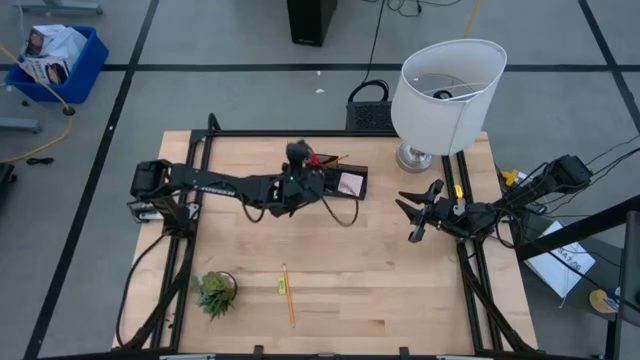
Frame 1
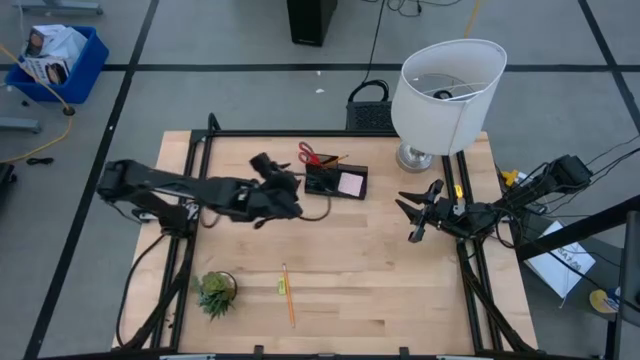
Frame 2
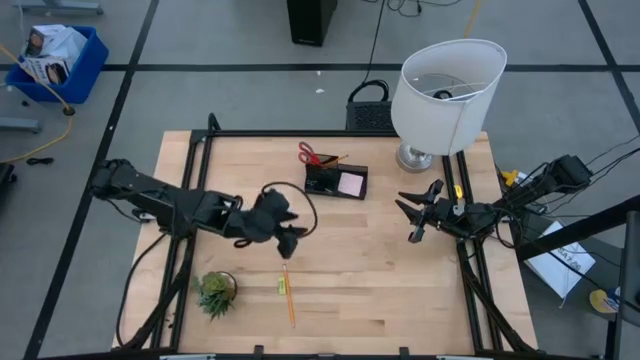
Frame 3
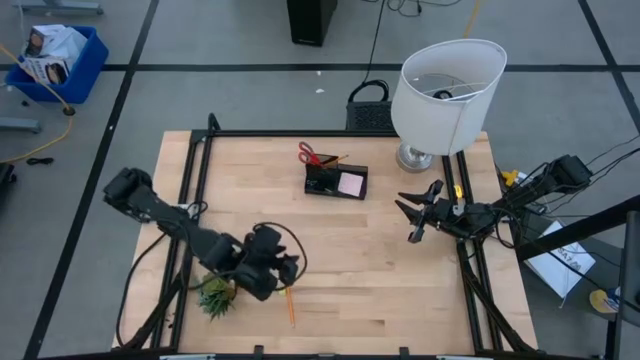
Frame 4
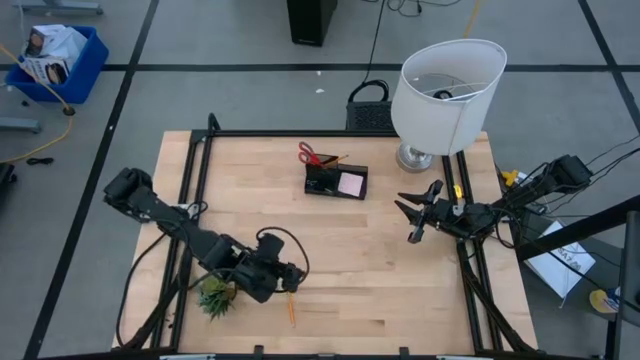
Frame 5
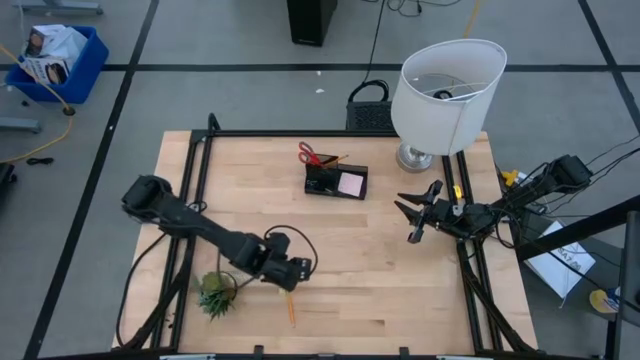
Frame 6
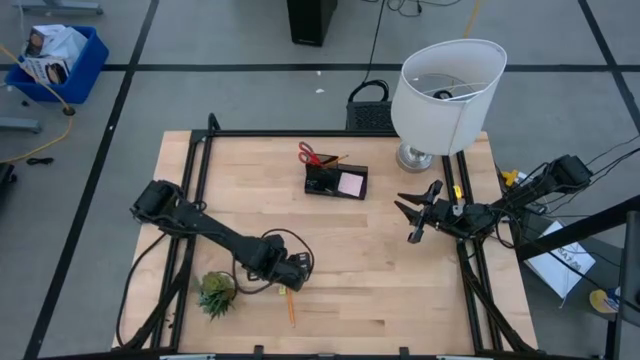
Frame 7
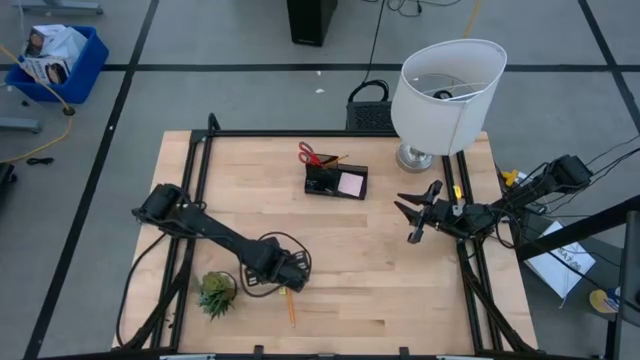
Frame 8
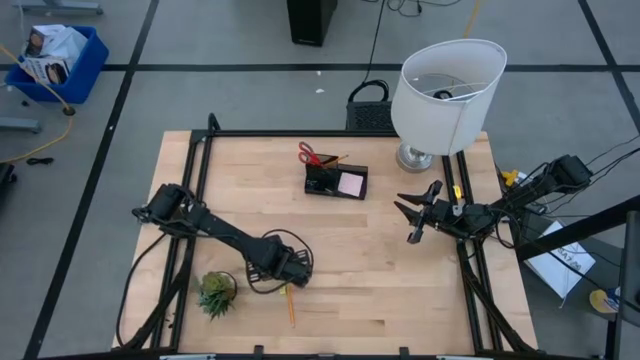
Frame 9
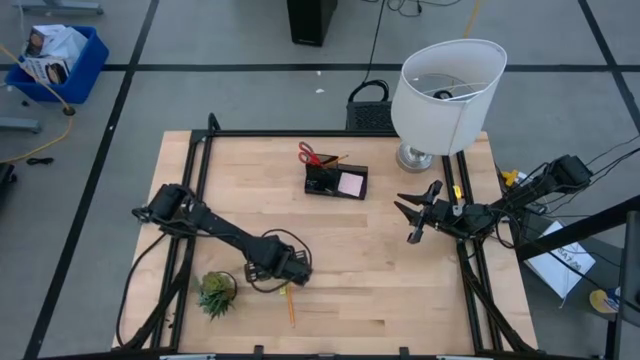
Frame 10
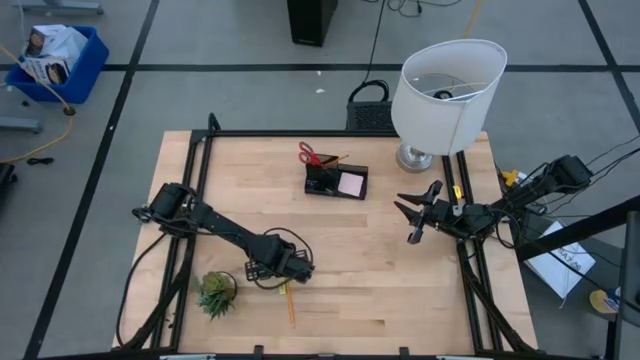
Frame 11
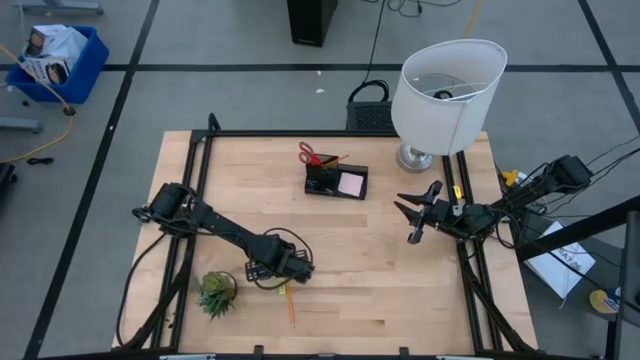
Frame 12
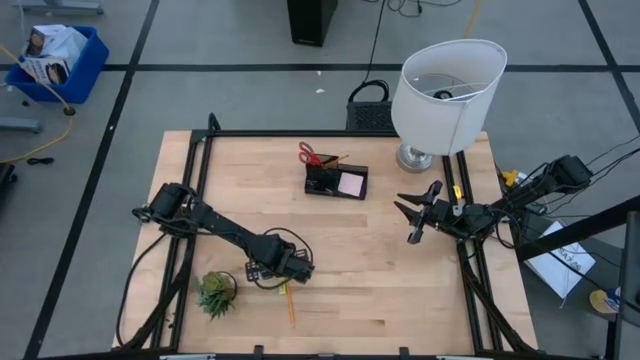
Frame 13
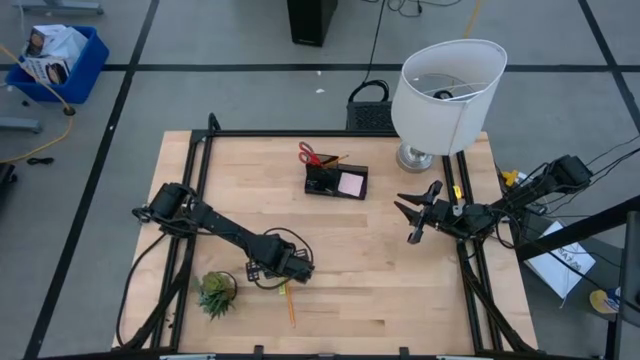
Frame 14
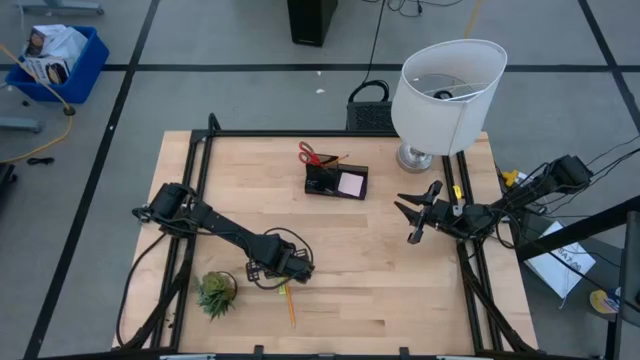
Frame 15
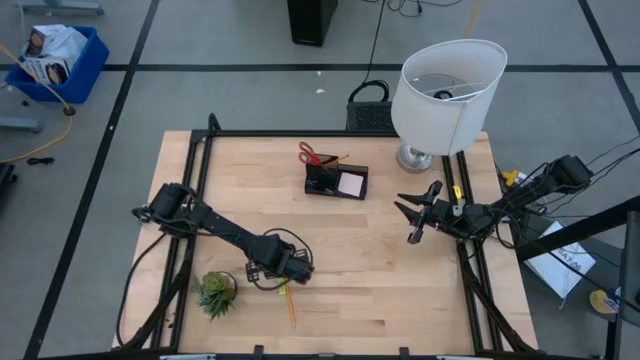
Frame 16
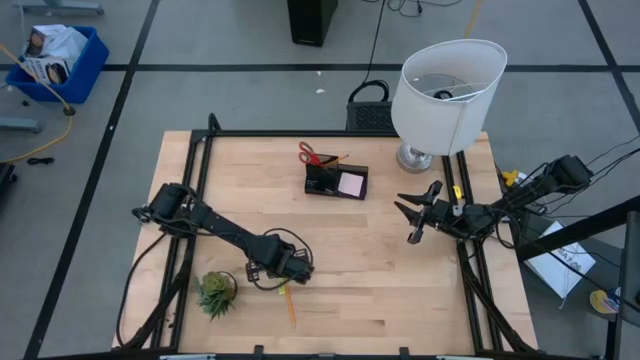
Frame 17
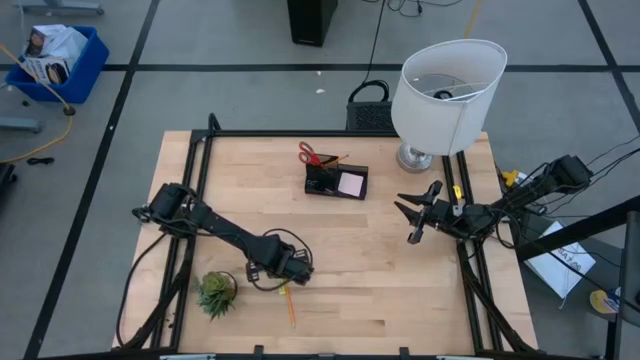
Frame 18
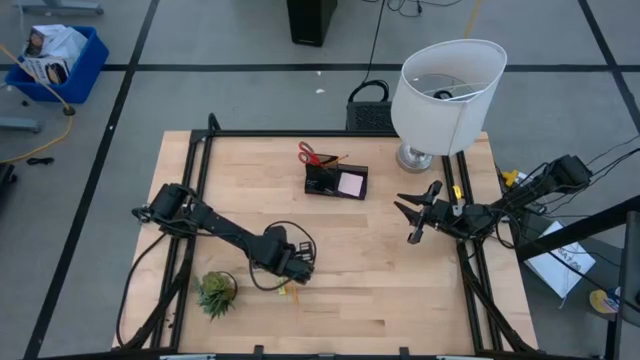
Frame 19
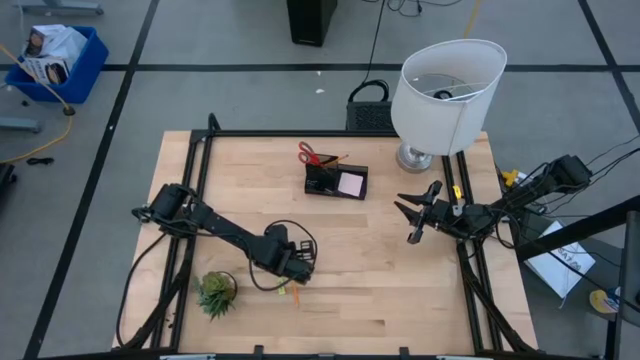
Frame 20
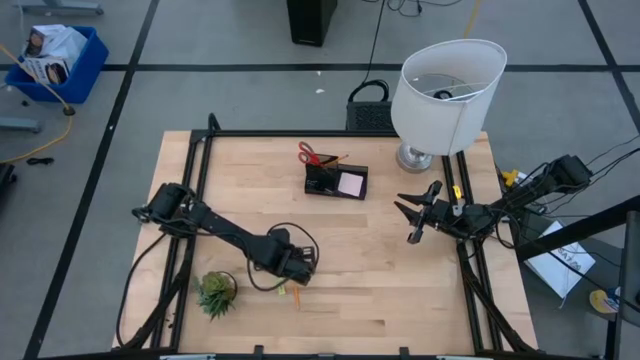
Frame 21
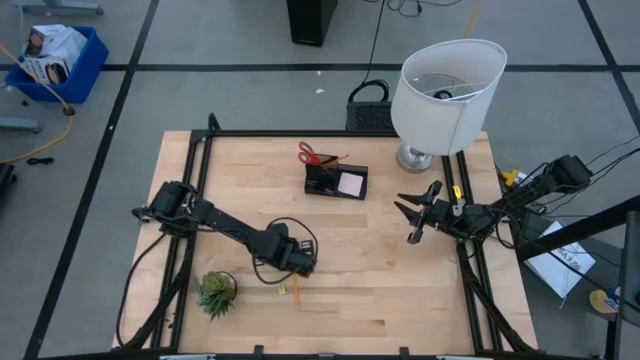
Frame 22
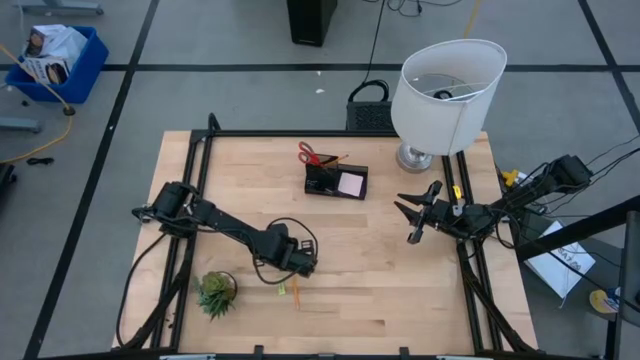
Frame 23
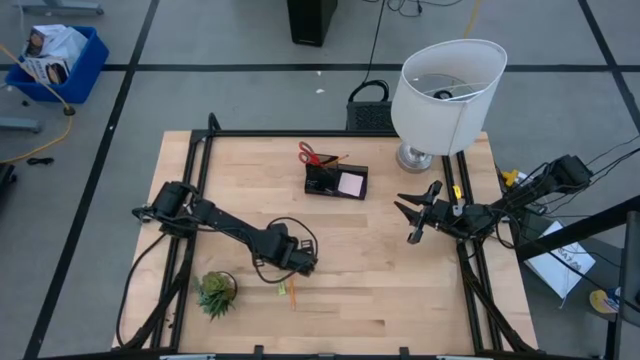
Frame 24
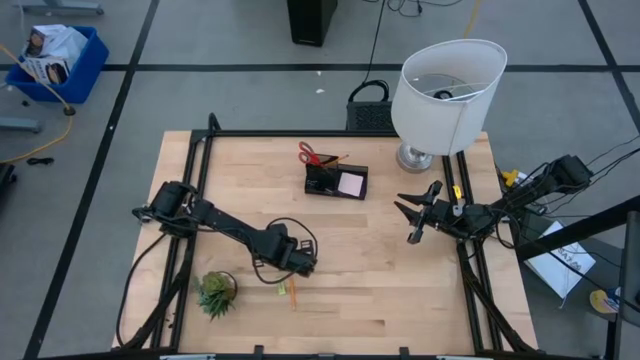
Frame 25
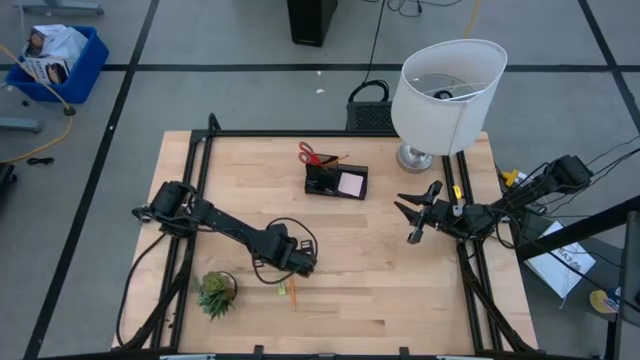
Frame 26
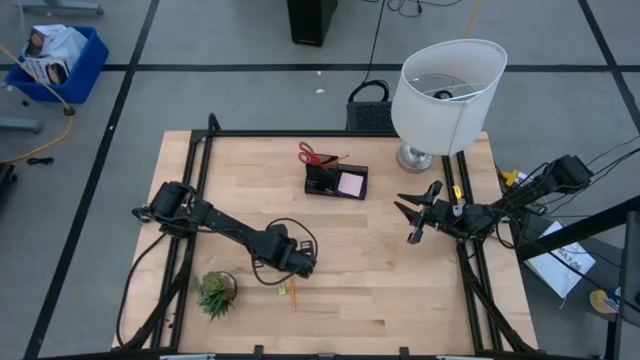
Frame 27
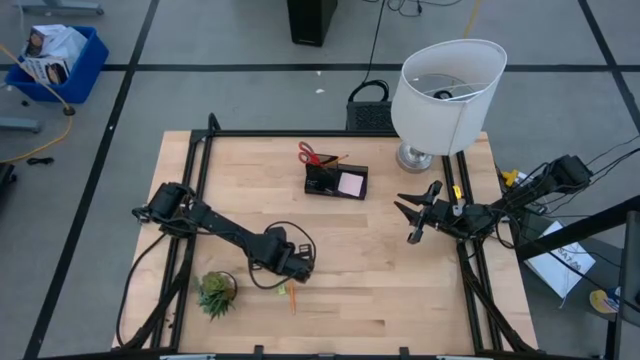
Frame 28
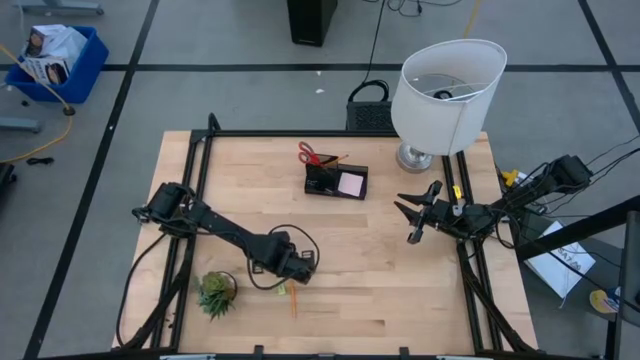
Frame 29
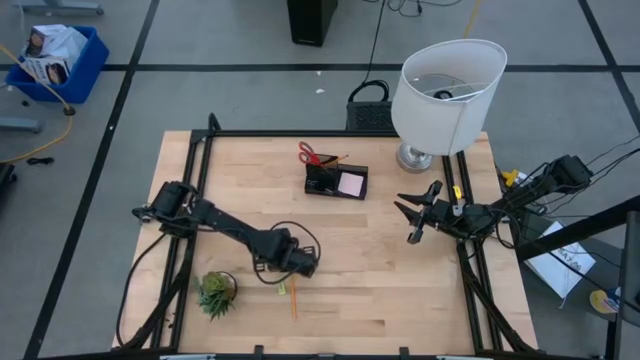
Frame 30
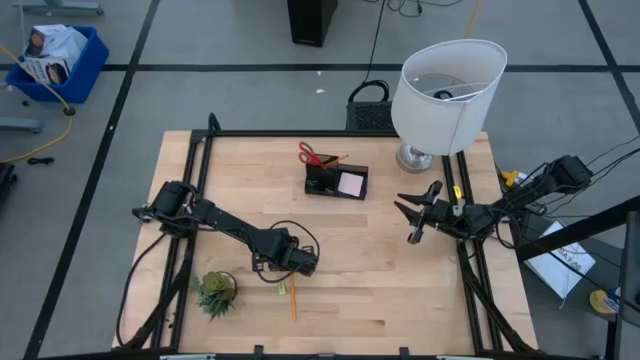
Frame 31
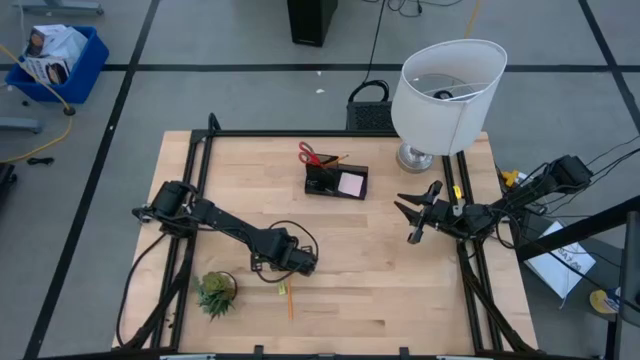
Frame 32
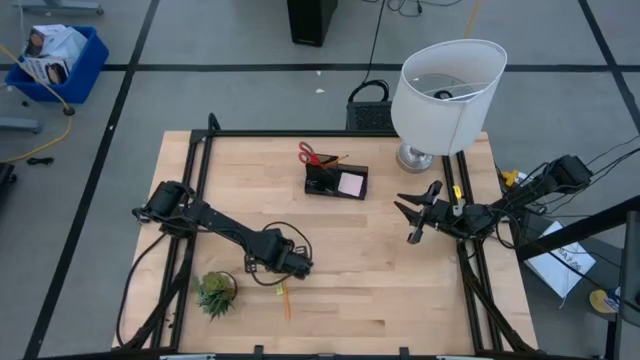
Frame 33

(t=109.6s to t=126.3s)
Task: Pick and place office supplies into organizer
Put the yellow pencil into the desk organizer
